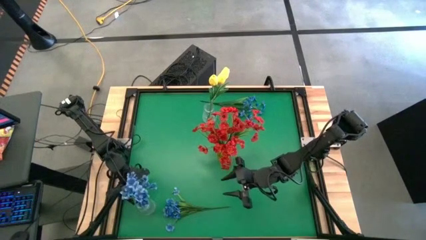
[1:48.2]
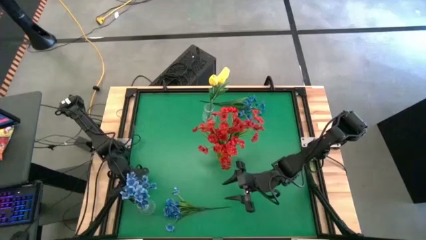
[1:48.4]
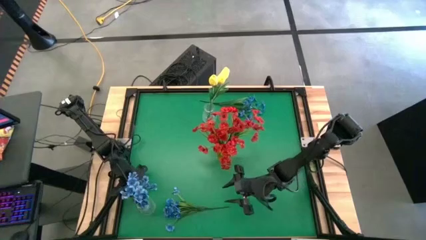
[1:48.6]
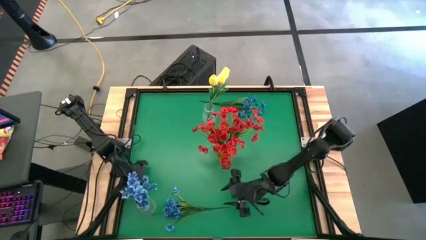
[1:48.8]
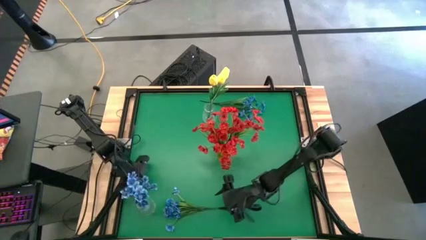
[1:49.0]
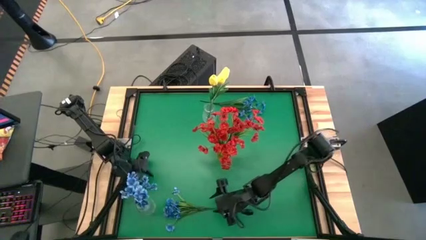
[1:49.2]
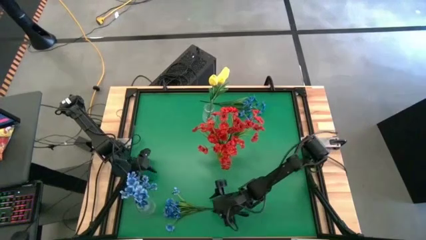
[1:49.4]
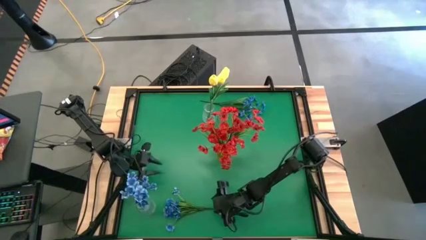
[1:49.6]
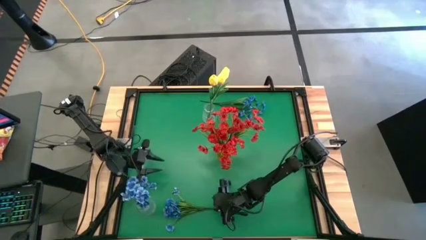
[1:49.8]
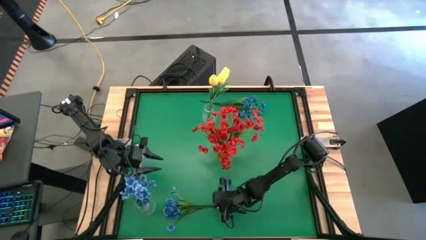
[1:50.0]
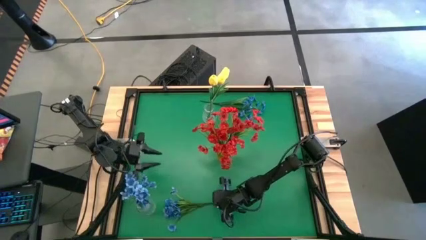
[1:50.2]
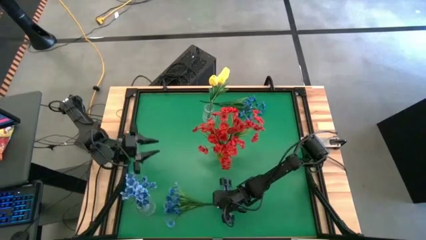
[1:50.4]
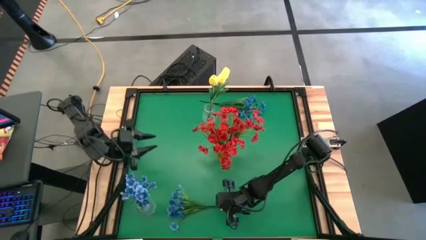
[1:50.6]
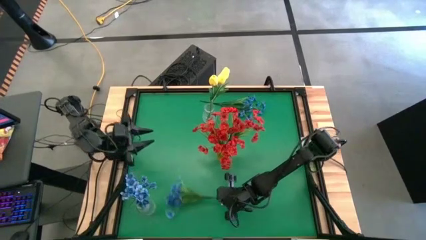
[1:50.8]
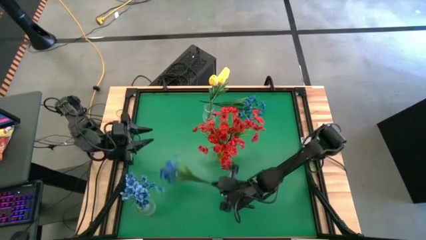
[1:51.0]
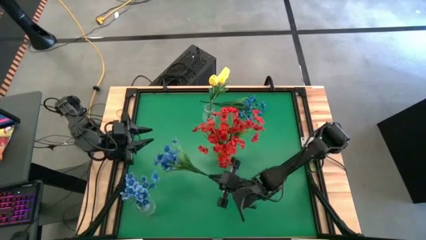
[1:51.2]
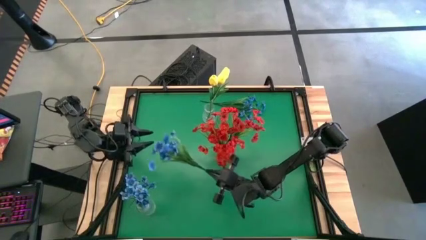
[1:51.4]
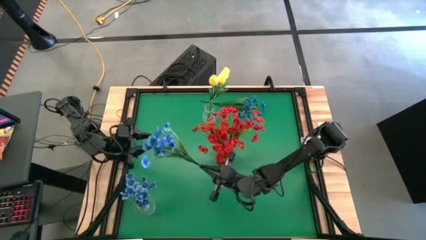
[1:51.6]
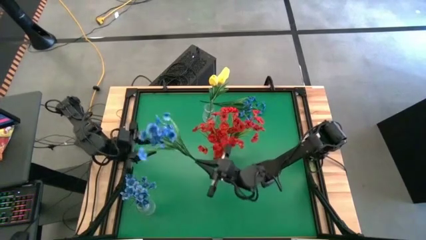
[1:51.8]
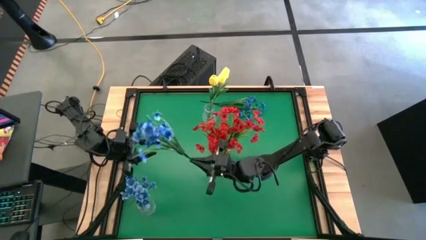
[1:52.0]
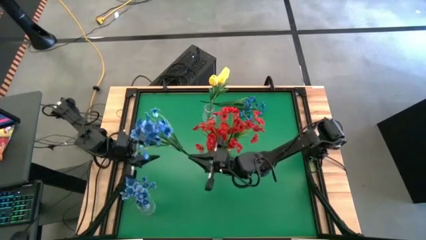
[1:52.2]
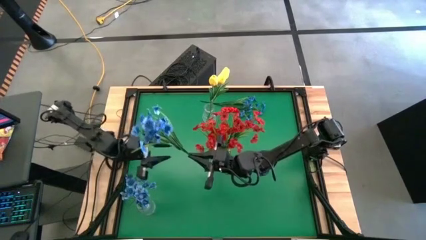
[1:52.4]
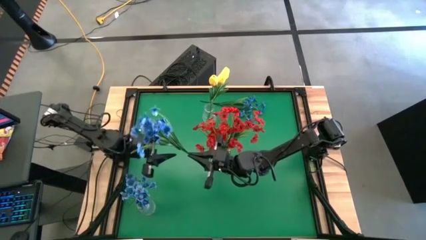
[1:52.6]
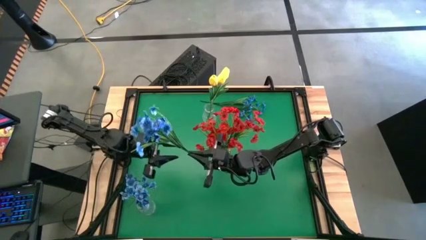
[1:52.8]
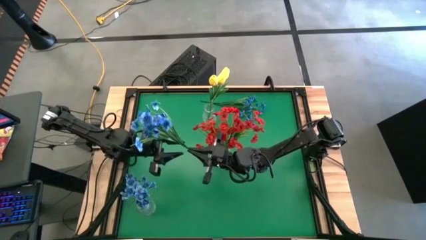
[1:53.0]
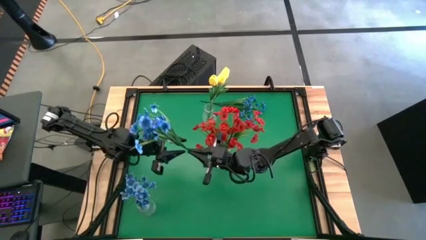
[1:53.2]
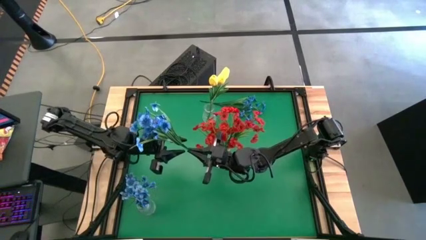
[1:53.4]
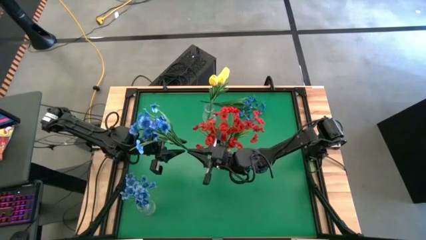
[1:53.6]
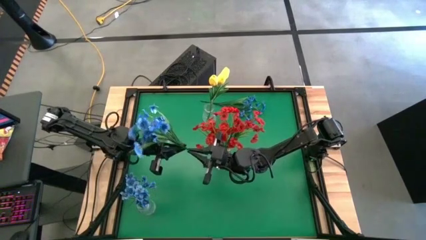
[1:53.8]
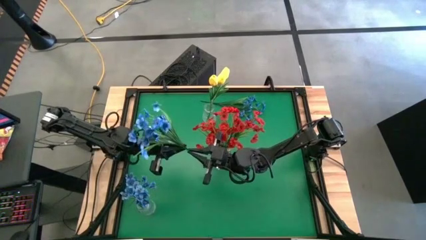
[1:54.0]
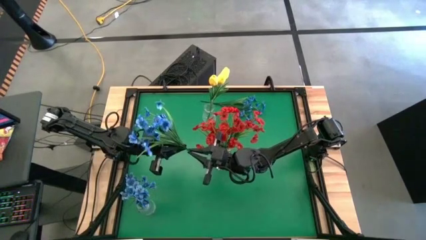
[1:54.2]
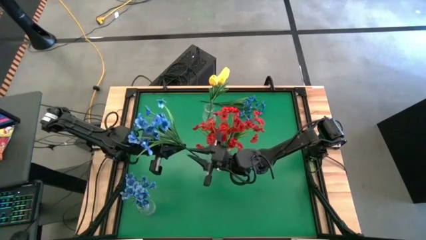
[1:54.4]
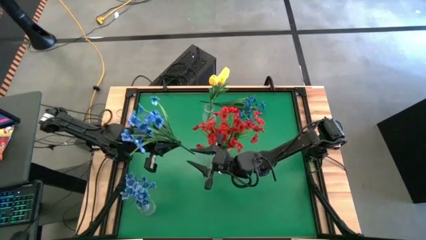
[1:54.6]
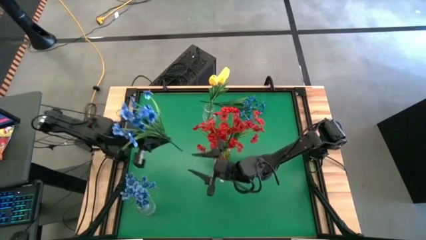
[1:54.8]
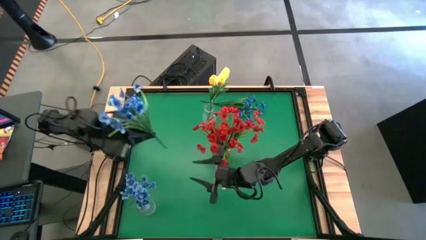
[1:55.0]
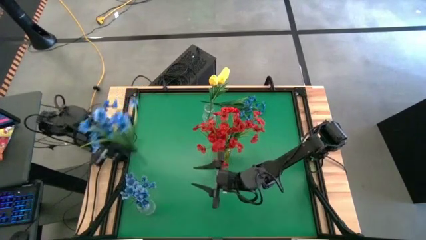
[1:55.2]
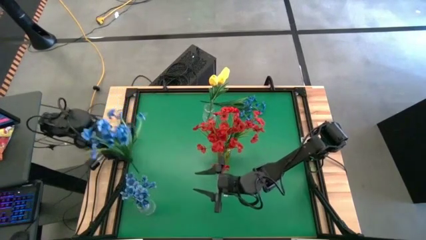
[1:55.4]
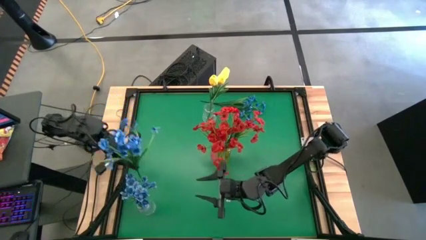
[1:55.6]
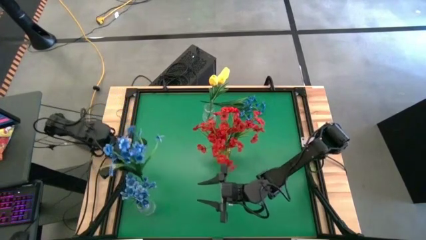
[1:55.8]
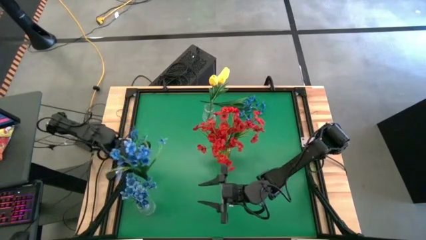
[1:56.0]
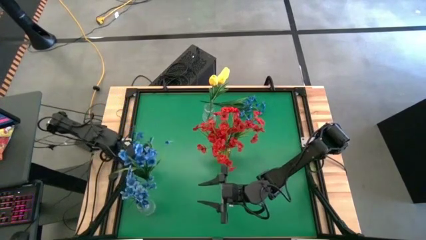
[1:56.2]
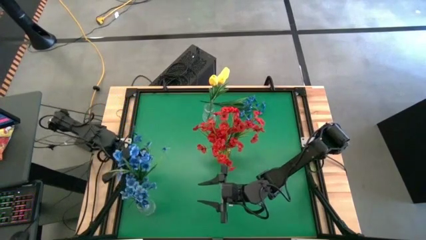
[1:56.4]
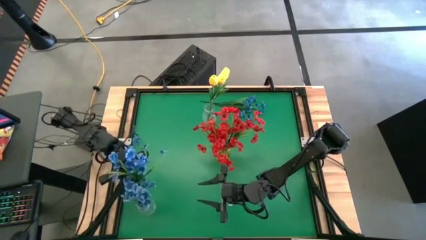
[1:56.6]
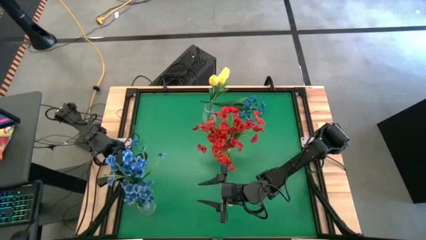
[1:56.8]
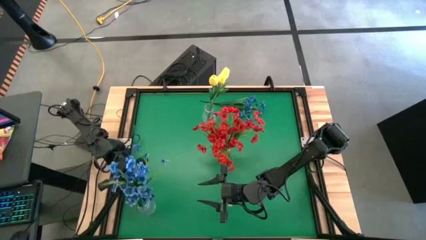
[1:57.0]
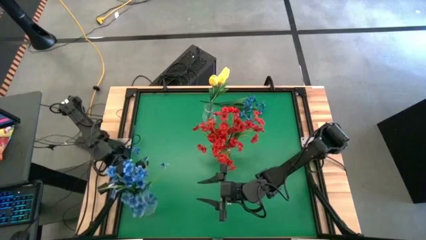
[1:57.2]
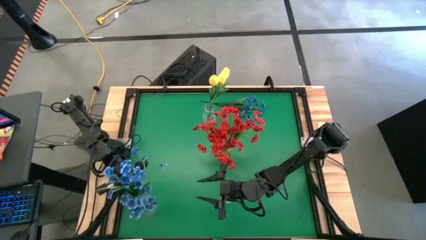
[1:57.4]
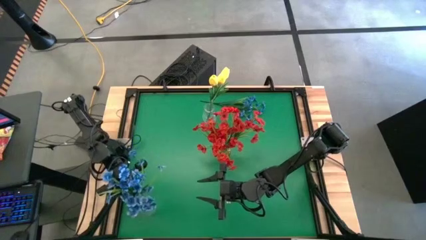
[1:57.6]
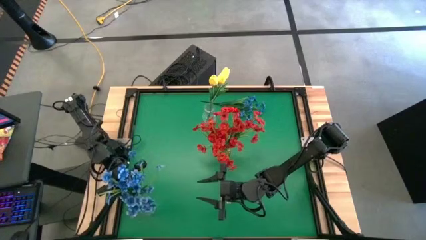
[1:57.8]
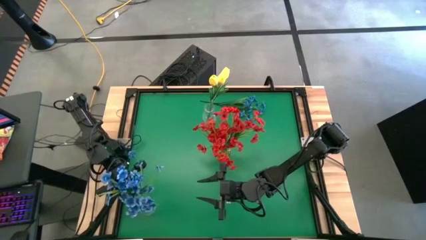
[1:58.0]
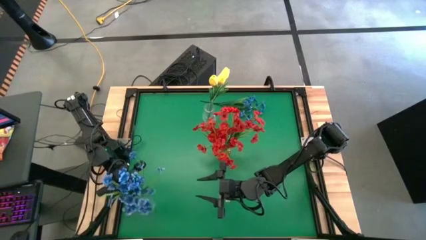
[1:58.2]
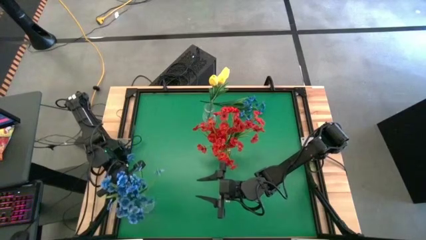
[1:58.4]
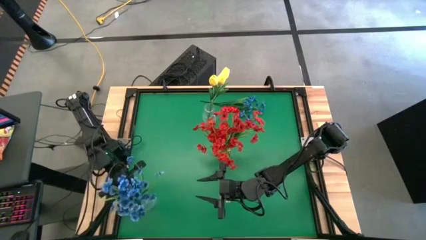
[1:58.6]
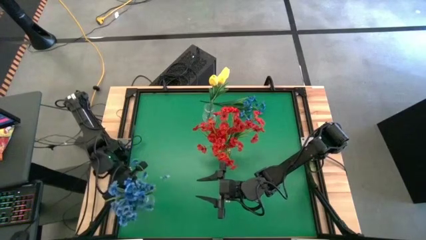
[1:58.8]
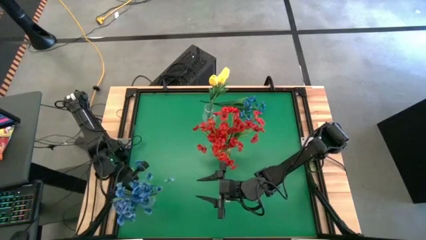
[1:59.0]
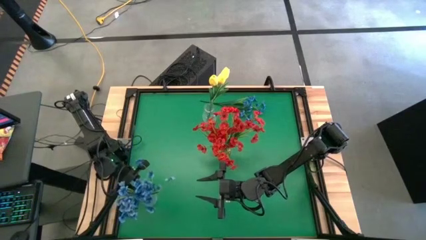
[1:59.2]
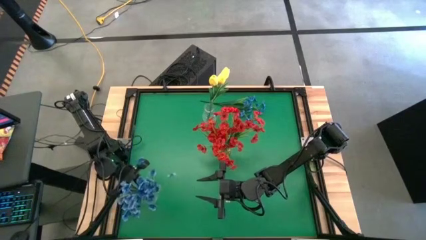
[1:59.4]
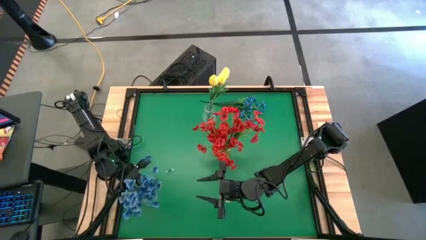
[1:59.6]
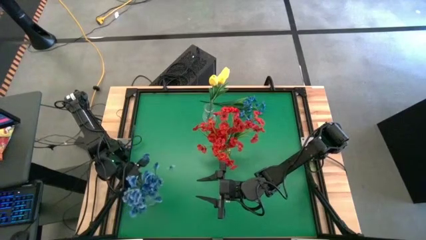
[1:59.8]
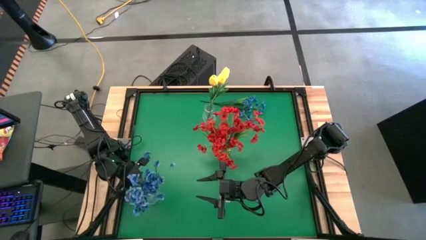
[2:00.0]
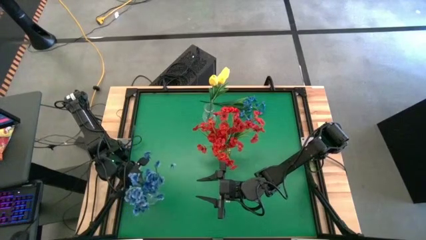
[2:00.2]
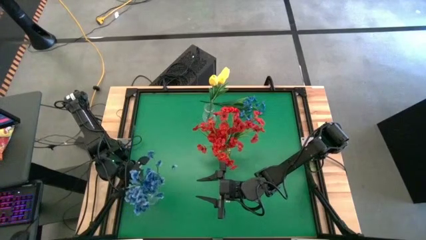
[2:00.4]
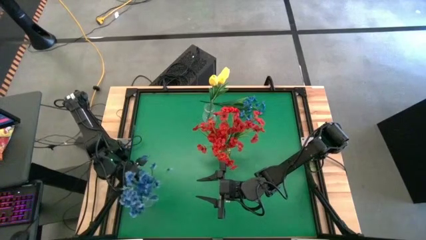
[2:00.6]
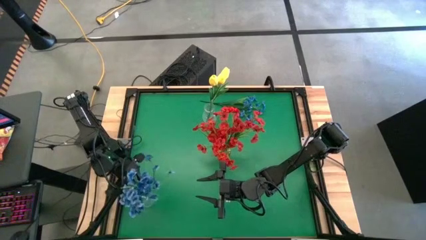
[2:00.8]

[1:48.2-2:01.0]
Task: Sort flowers into vase by color
Put the bottom blue flowers into the bottom transparent vase
